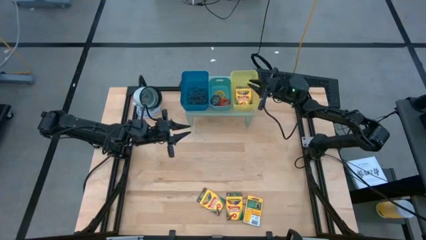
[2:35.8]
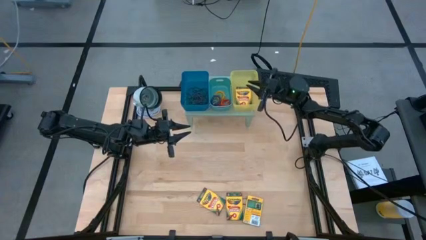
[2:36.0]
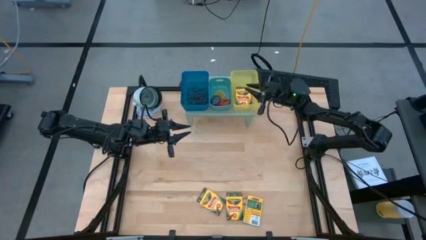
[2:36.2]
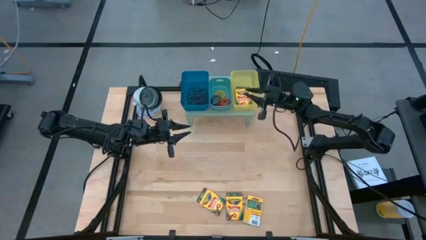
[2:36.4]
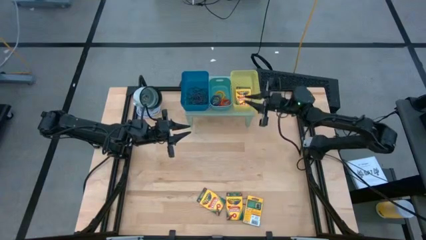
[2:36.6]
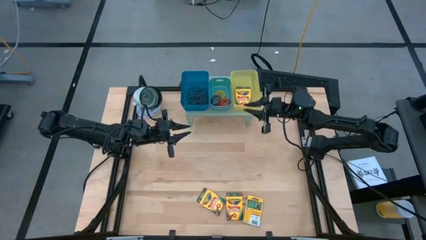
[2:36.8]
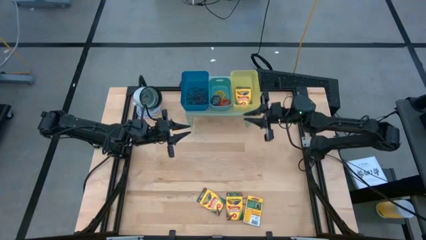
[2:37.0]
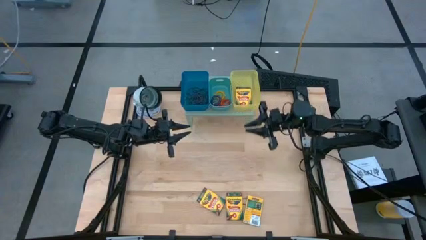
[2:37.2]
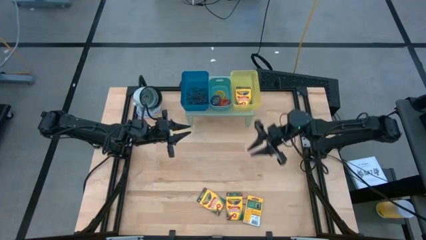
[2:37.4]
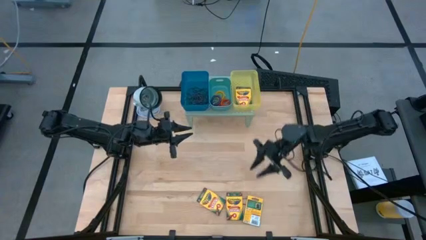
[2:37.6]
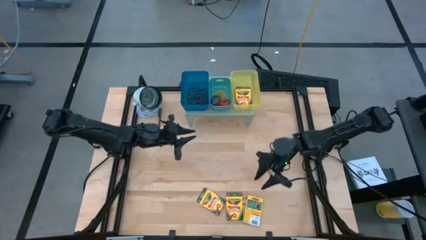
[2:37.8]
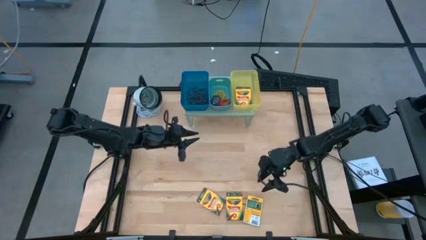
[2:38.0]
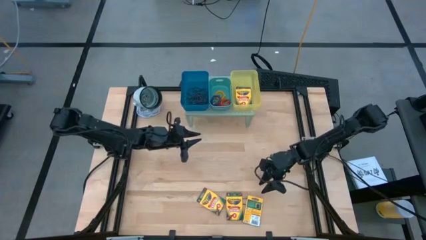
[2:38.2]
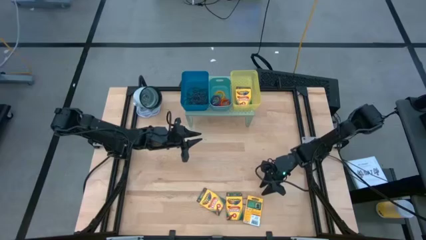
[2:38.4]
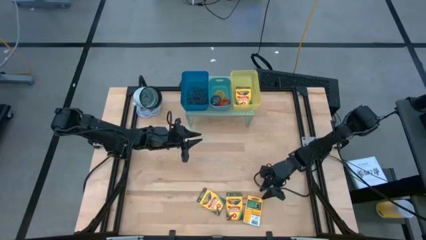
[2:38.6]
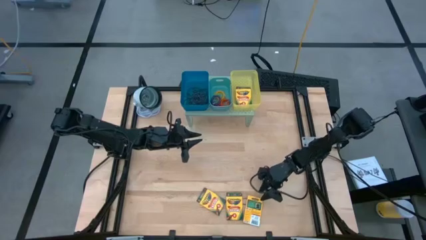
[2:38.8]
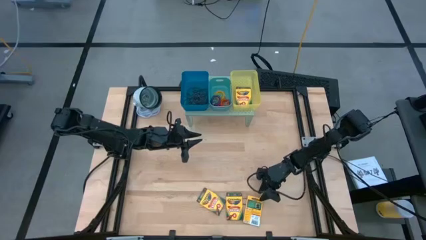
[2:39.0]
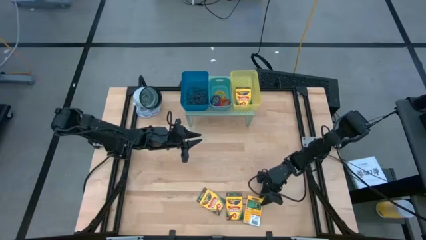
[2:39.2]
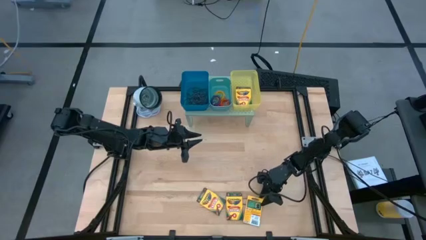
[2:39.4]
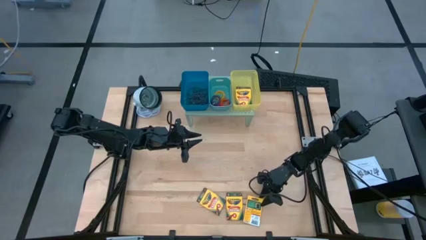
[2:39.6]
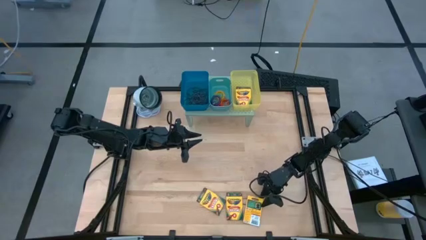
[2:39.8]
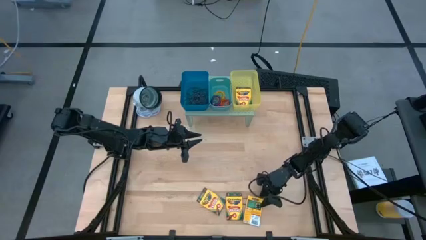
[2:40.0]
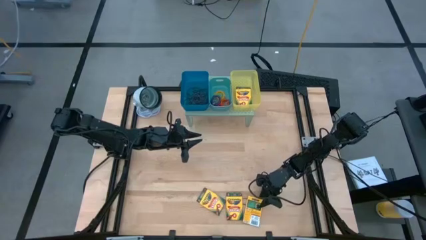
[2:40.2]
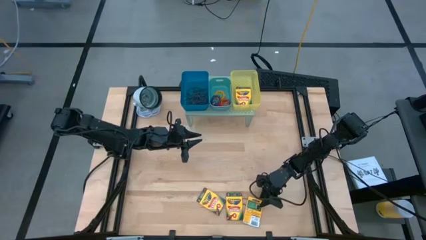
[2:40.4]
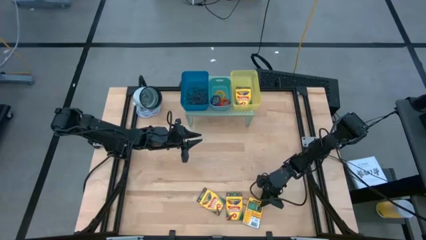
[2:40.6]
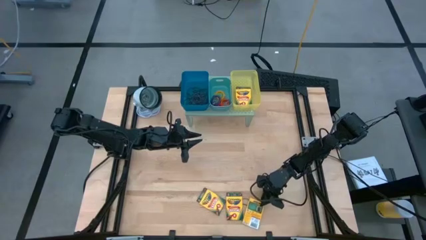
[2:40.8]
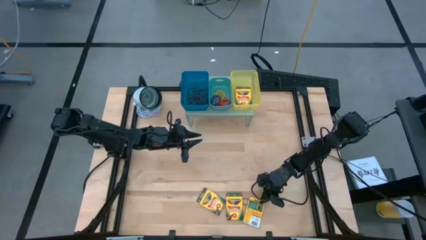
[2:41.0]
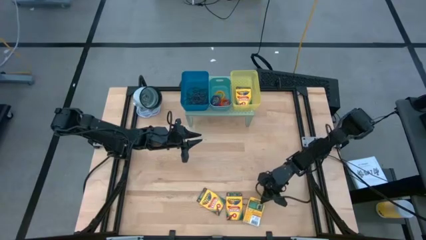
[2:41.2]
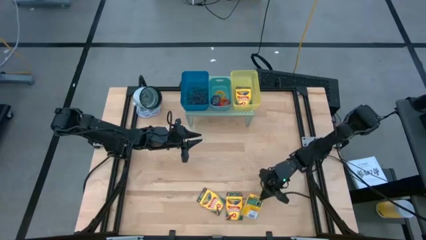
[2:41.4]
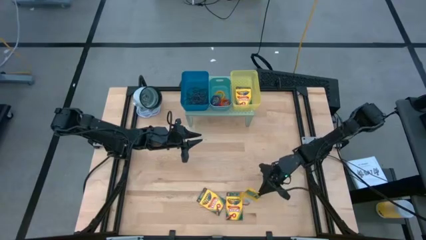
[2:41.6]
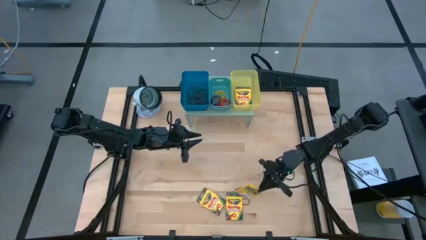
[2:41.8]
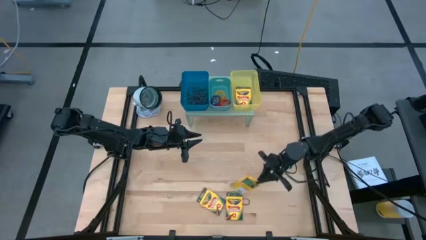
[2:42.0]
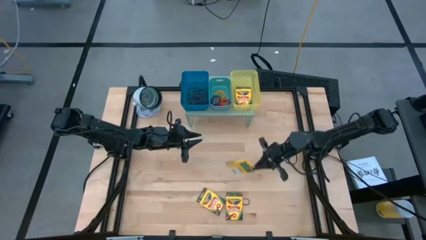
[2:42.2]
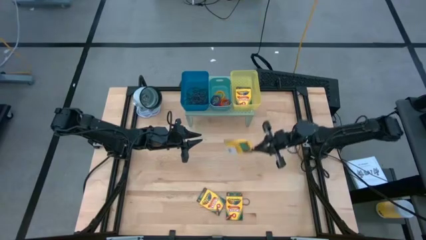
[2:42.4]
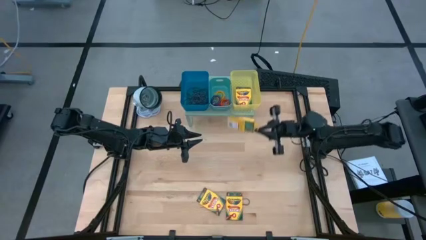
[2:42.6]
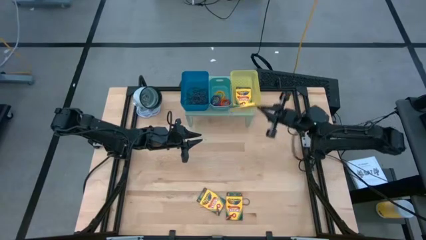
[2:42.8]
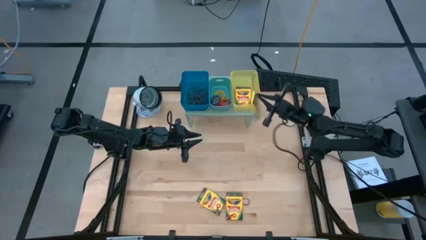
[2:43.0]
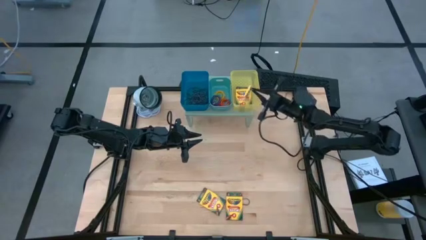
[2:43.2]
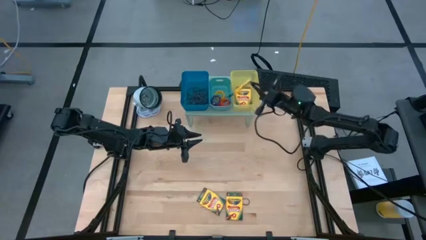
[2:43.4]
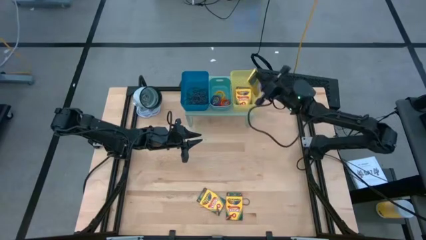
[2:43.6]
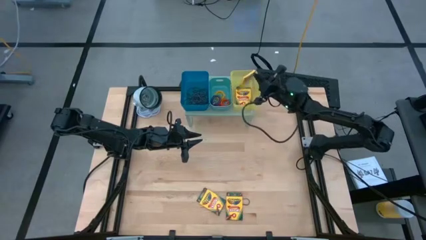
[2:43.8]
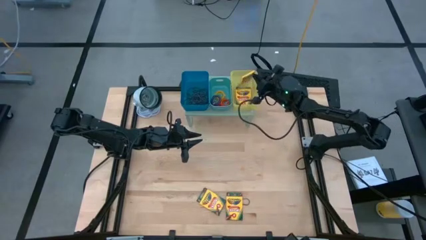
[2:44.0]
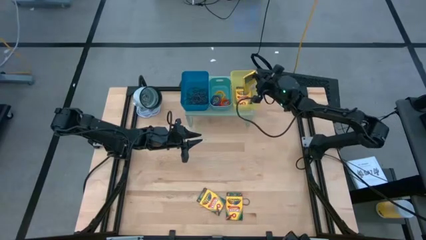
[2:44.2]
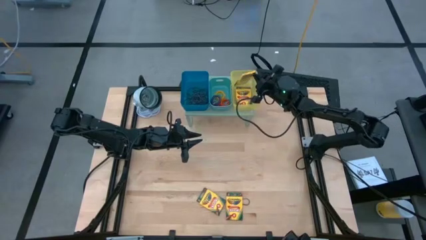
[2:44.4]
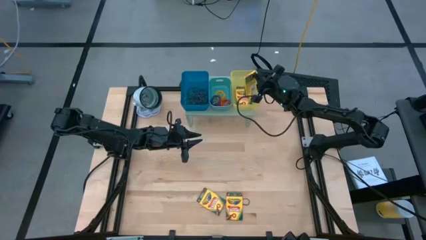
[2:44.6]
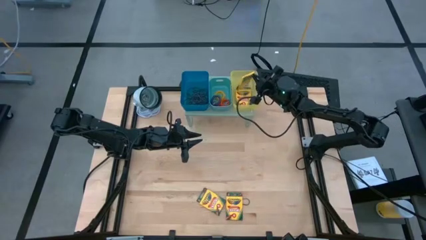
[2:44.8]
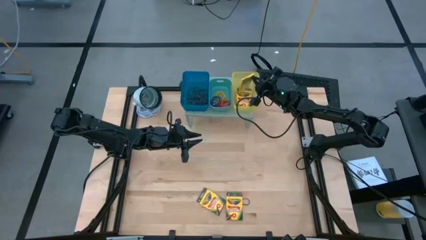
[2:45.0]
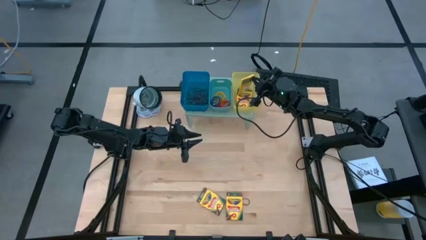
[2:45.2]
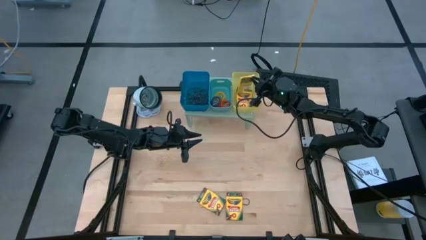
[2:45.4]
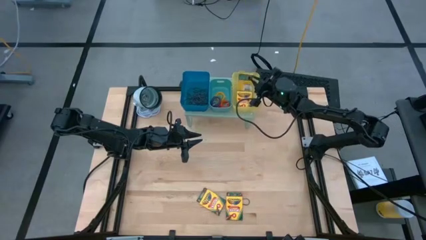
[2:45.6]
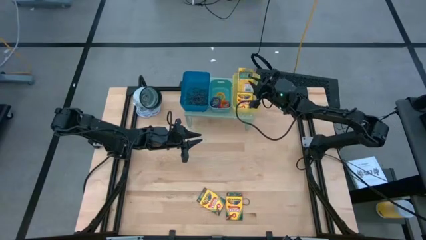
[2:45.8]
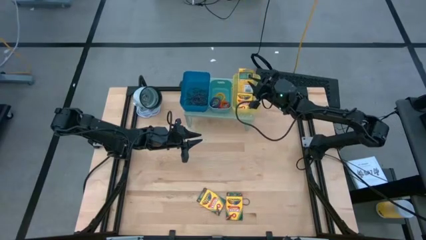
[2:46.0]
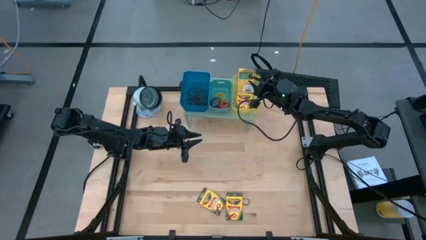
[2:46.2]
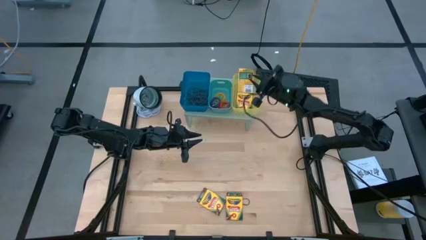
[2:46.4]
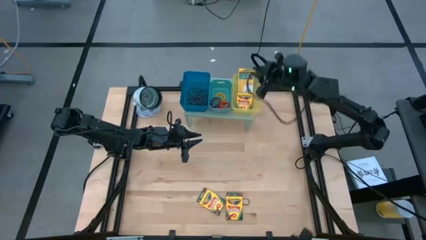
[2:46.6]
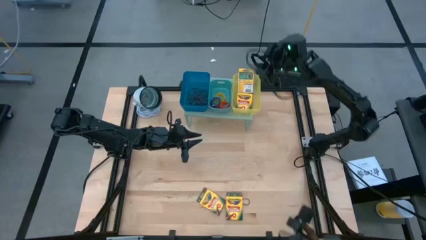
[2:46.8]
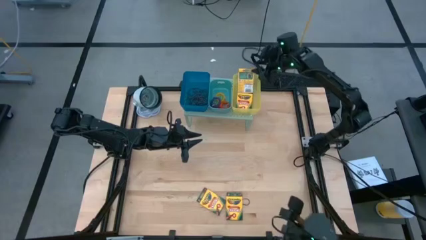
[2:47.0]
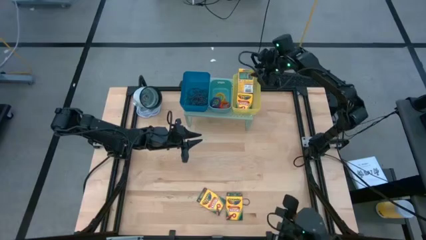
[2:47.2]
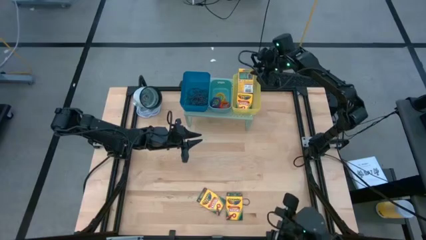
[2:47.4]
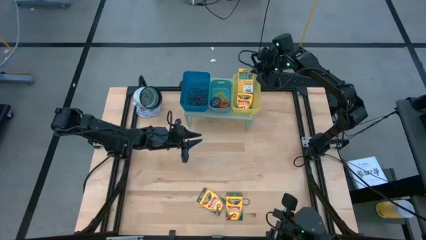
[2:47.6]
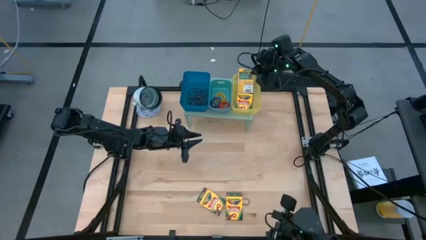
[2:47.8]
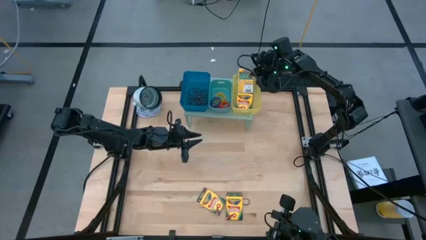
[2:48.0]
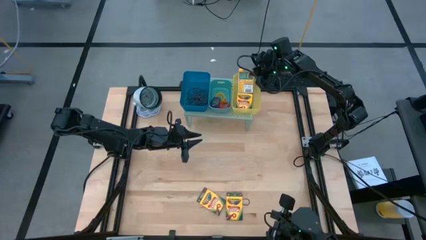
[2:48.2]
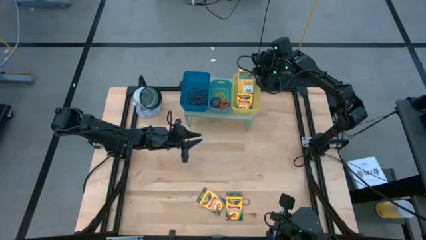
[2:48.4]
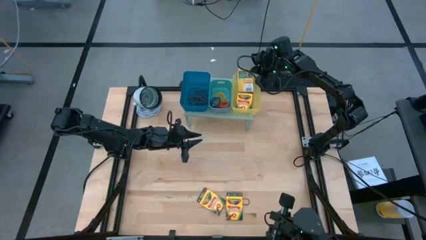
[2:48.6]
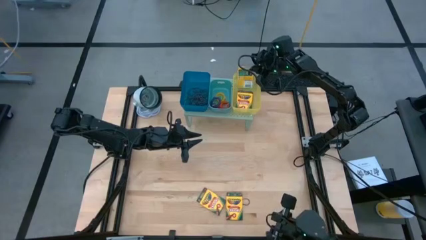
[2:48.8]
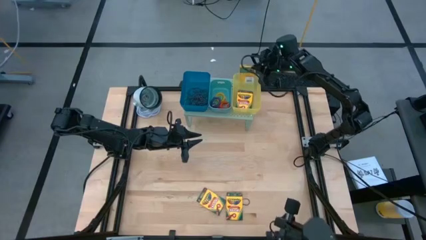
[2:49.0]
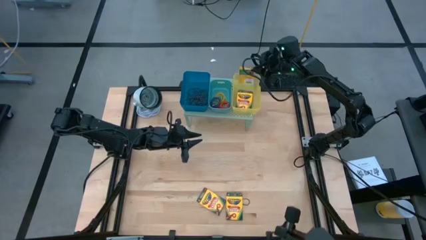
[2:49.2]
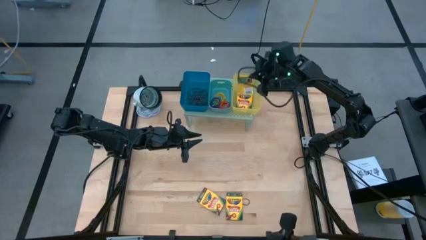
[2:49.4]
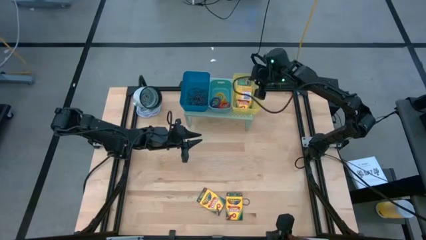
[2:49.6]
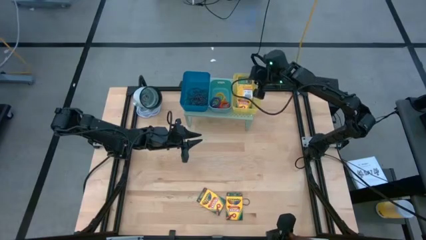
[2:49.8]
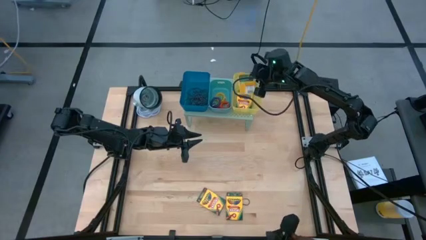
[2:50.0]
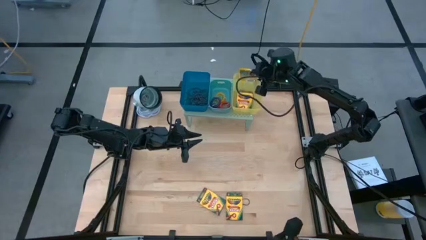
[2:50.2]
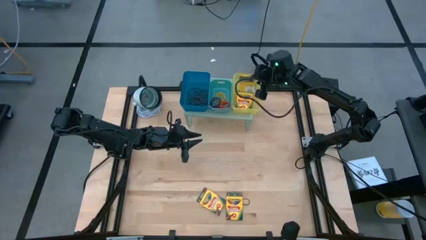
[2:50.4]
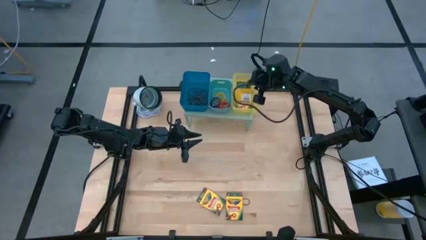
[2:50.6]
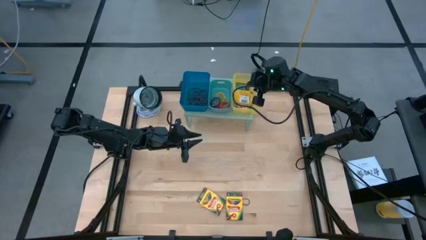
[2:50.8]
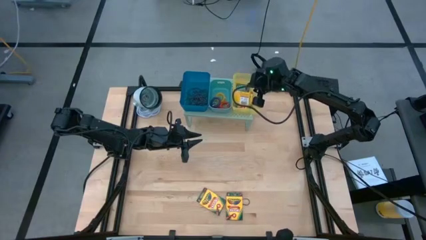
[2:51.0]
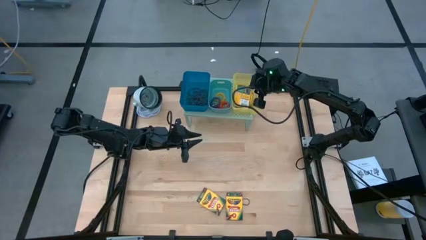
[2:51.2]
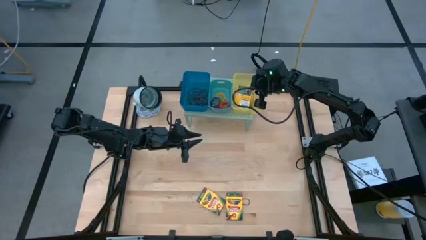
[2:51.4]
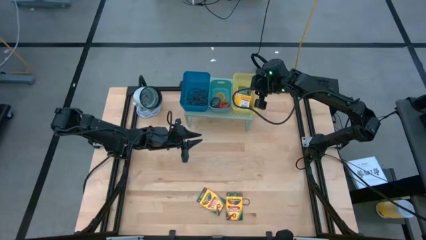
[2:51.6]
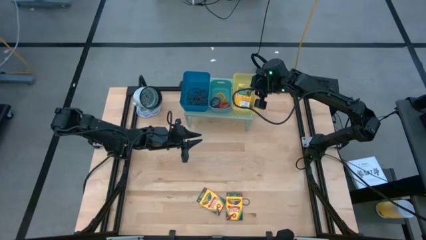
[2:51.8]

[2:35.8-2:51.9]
Task: Pick & Place Office Desk Supplies
Put the yellow crayon box into the yellow bin on the shelf
